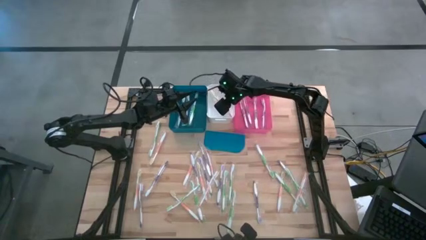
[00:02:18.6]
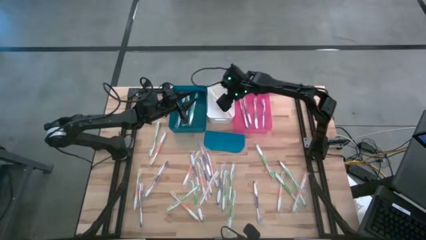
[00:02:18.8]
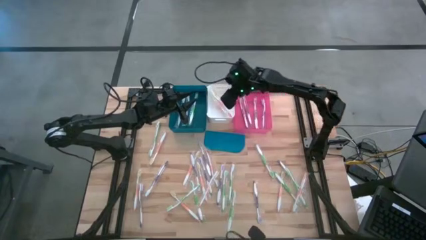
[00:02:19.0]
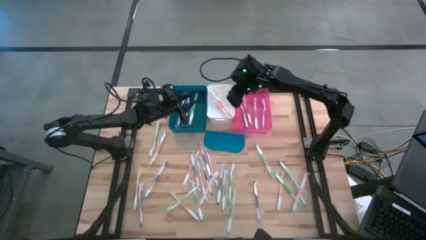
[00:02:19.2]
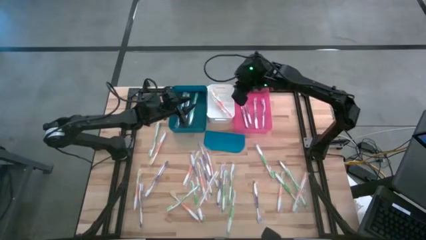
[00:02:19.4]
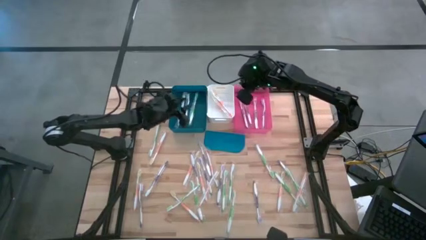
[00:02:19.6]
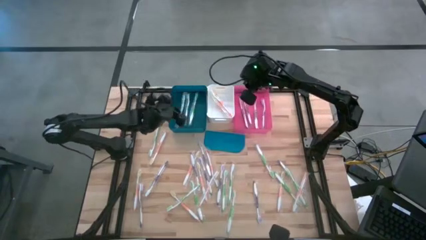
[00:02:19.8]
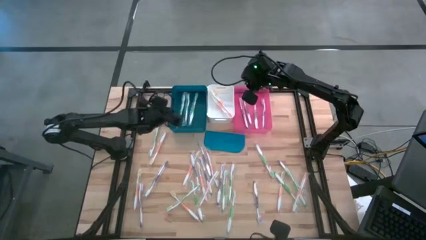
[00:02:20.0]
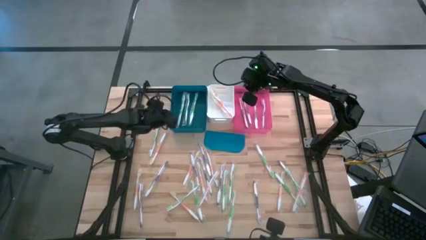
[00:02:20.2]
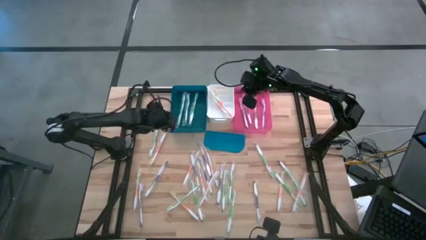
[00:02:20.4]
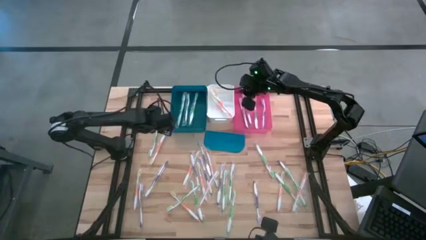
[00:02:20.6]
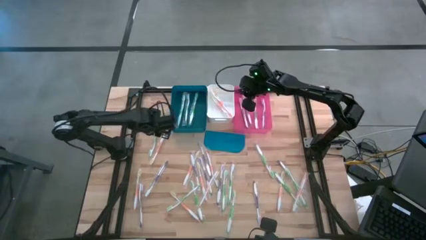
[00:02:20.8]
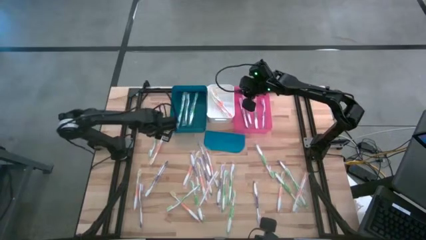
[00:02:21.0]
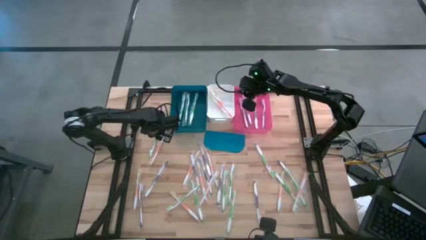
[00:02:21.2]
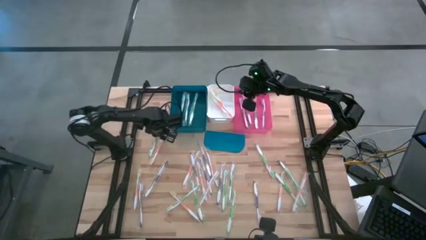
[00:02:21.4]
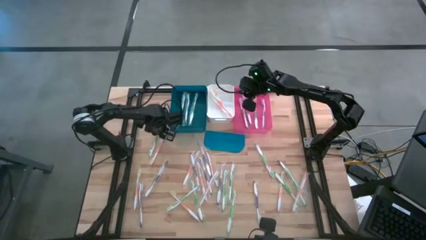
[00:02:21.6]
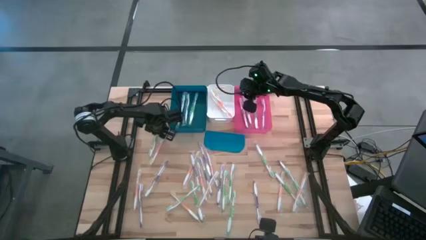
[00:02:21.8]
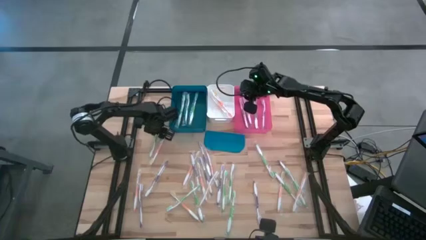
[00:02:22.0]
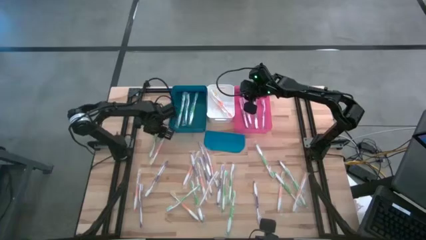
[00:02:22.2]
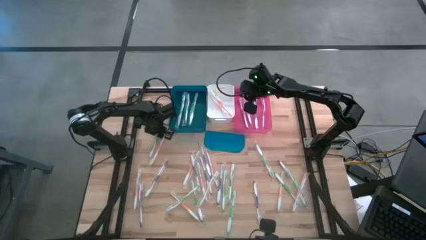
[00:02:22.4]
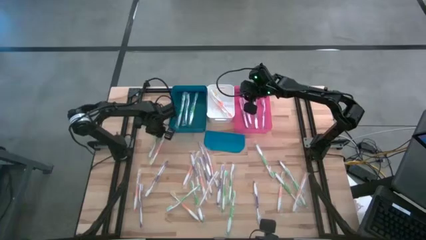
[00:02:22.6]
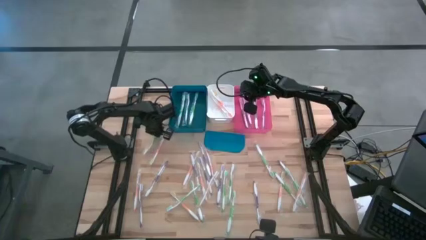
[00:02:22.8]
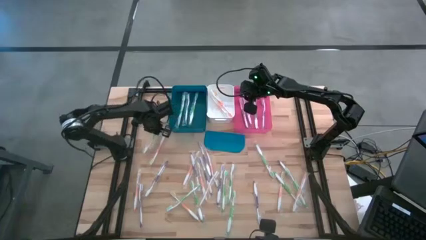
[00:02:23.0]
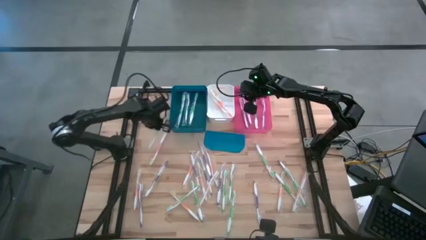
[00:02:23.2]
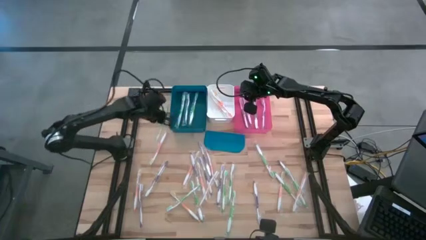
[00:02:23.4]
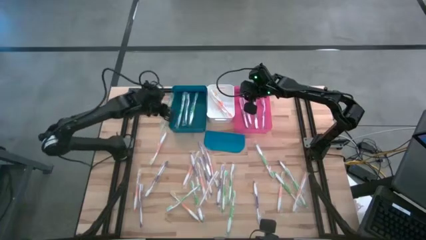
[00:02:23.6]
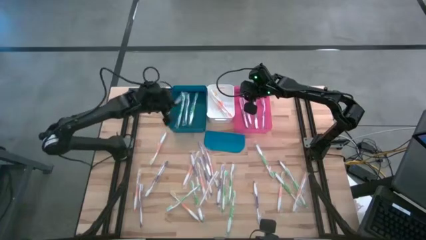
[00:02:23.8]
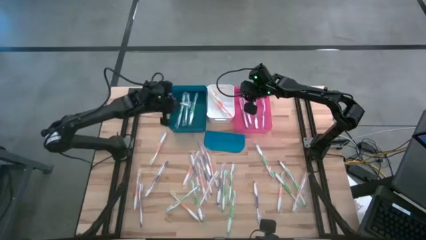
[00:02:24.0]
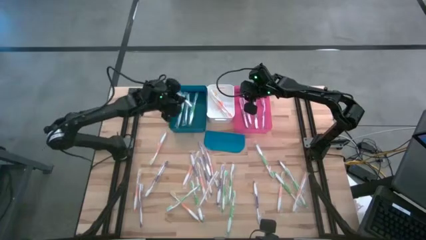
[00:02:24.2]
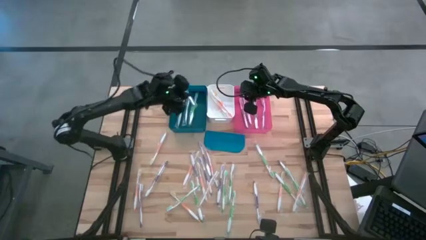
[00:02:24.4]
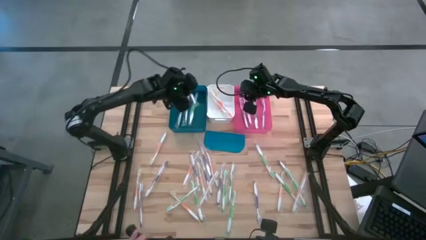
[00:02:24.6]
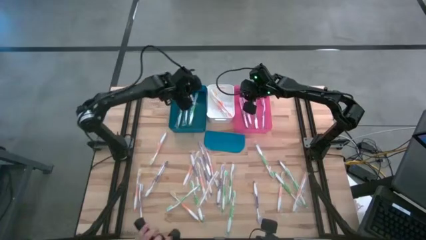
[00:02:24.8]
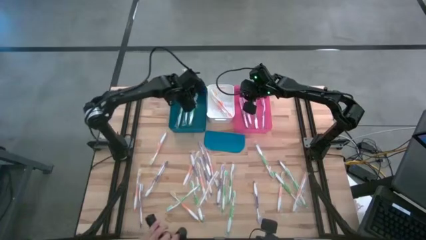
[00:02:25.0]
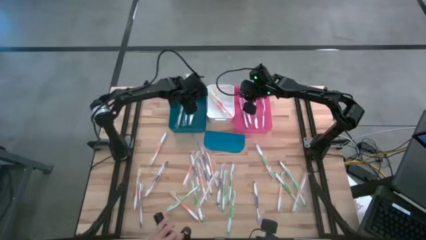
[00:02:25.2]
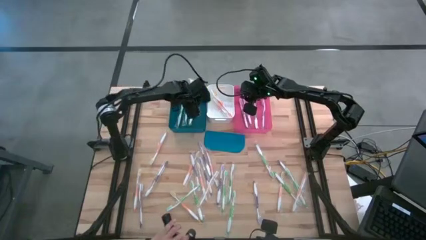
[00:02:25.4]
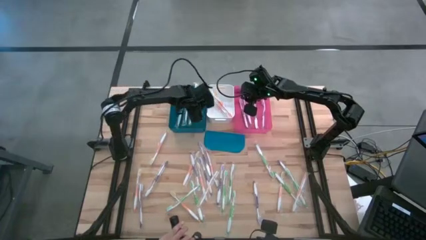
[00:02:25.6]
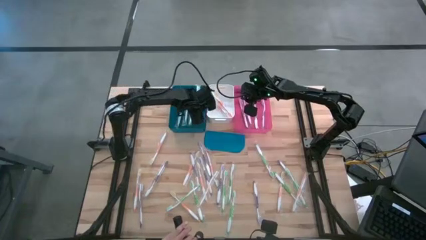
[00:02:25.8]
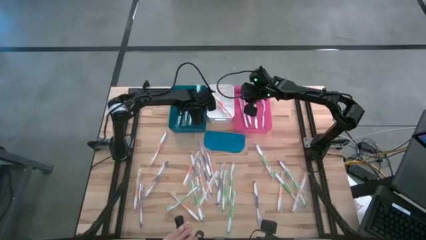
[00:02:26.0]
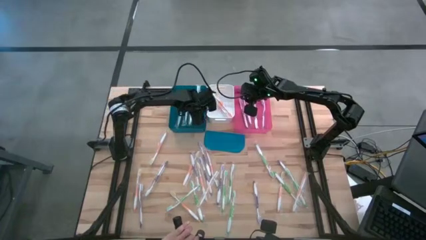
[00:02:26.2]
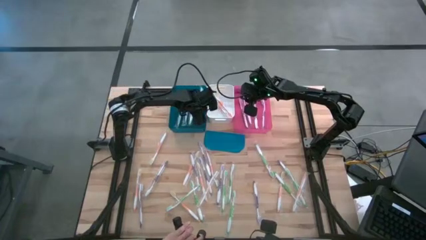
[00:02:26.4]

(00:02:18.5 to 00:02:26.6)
Task: Pick & Place Toothbrushes
Put the green toothbrush into the blue bin

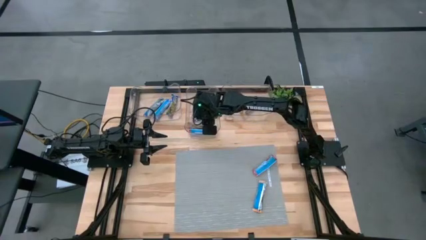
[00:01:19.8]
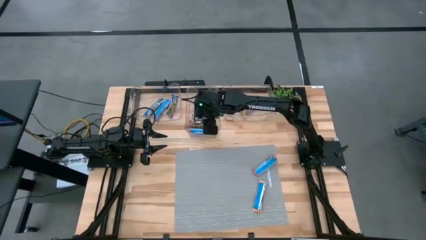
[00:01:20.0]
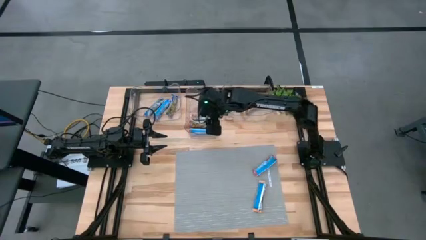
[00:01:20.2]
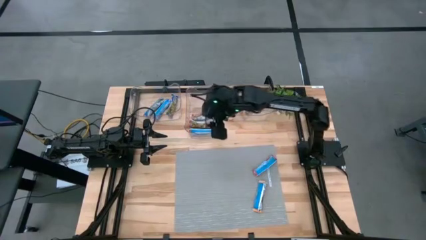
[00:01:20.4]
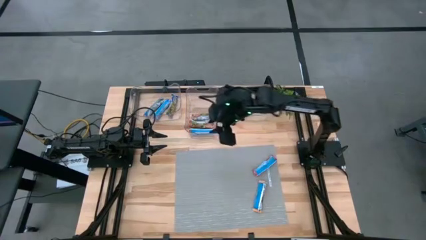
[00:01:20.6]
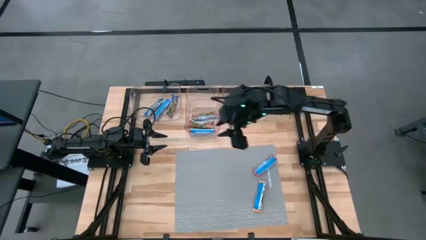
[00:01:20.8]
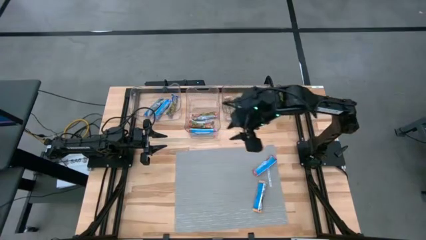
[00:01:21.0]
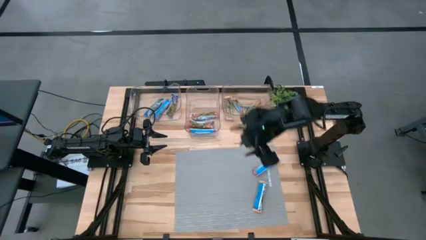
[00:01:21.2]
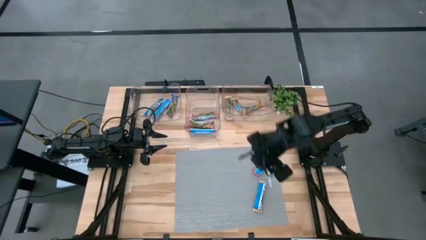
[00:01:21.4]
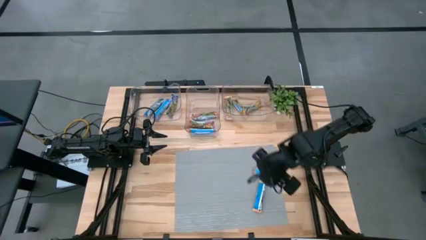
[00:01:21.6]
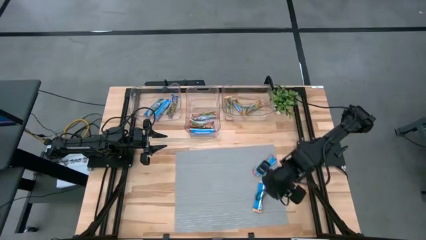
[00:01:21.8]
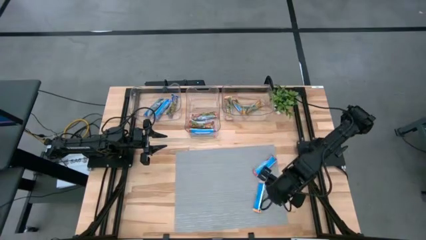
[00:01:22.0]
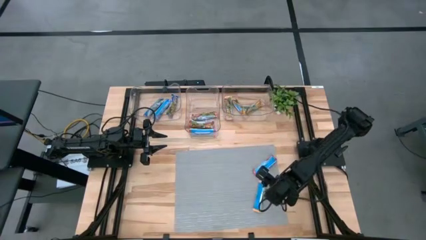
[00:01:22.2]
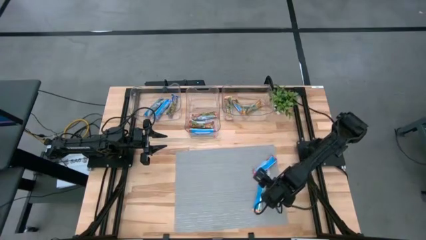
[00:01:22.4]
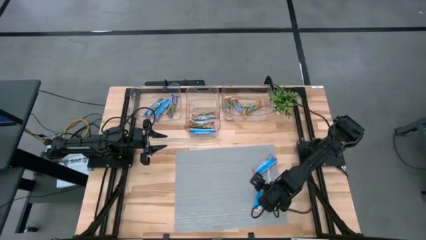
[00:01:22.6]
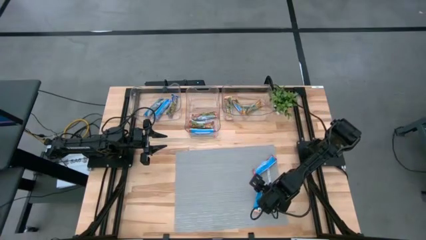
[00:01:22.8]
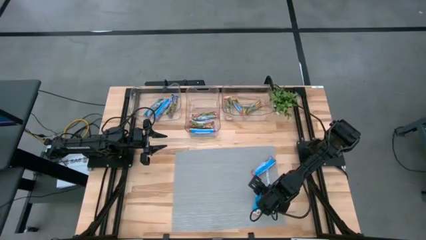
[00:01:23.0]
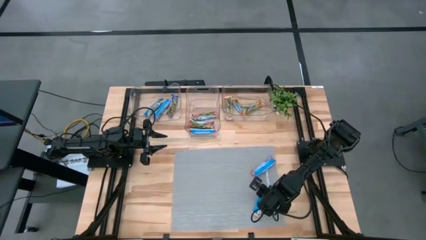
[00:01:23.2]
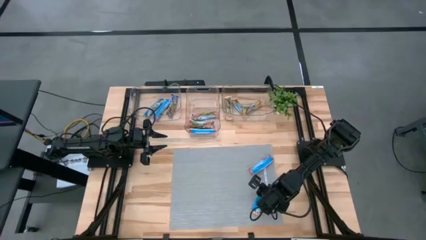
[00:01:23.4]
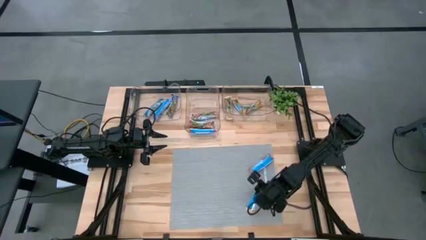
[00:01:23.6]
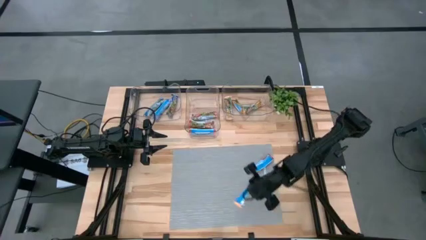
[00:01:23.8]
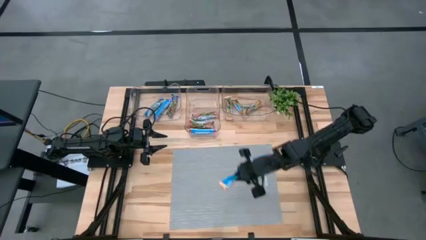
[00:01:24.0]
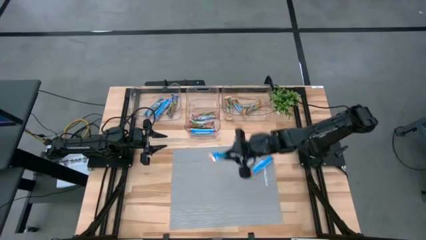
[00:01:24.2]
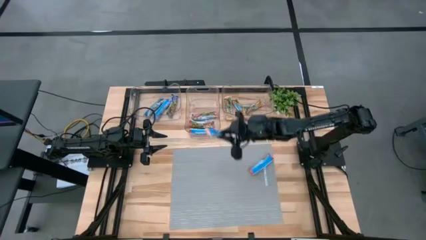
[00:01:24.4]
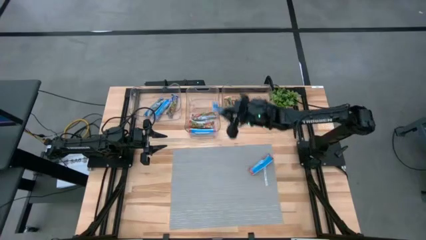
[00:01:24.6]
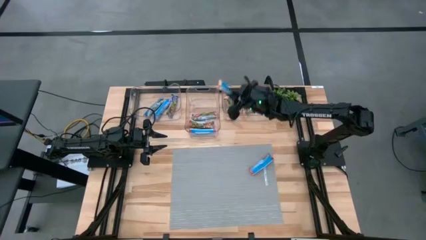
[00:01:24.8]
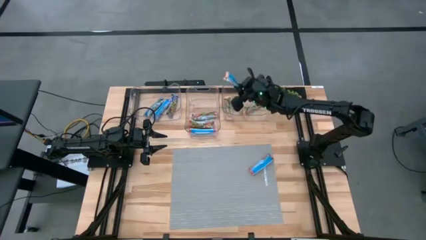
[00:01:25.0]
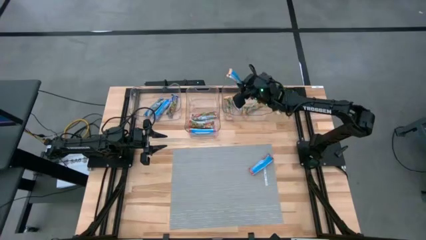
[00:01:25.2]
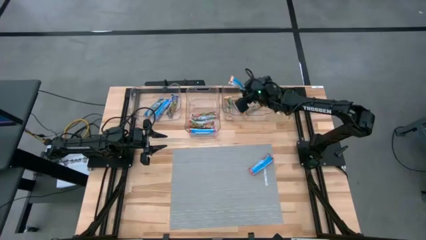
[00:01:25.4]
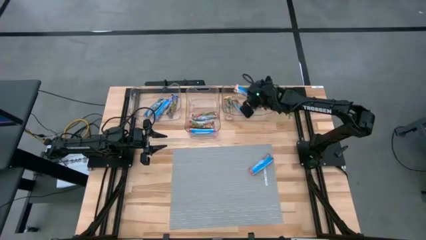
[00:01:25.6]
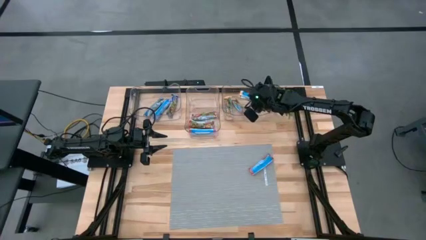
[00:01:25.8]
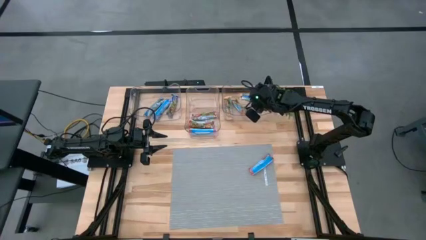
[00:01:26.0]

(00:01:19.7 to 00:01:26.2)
Task: Pick and place Granola Bars by type
Put the yellow granola bar into the right transparent bin
